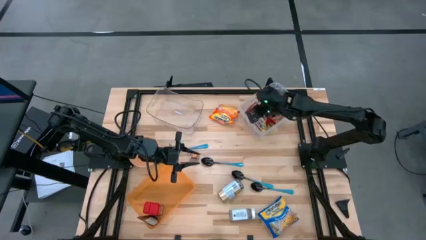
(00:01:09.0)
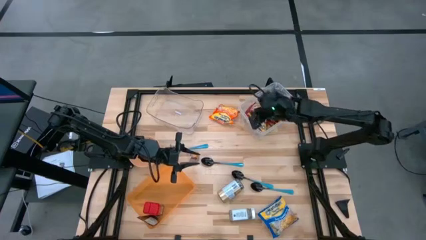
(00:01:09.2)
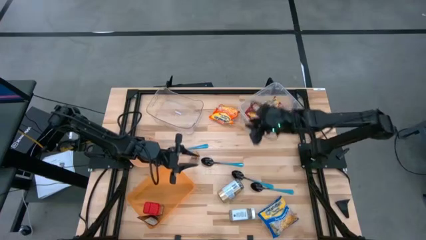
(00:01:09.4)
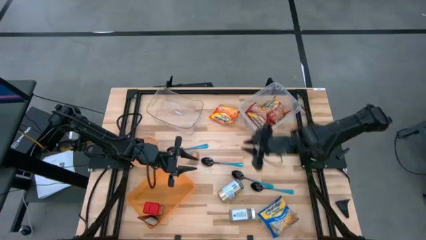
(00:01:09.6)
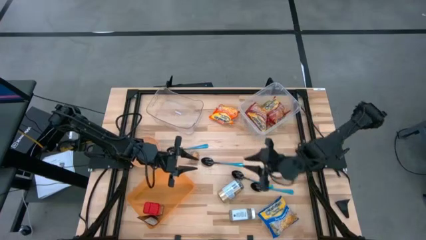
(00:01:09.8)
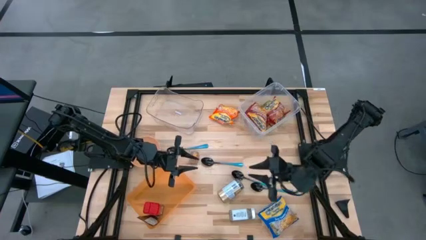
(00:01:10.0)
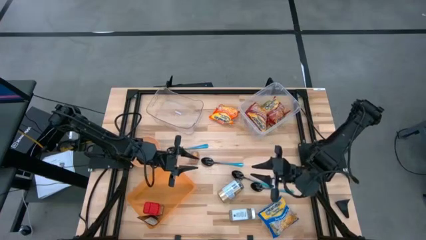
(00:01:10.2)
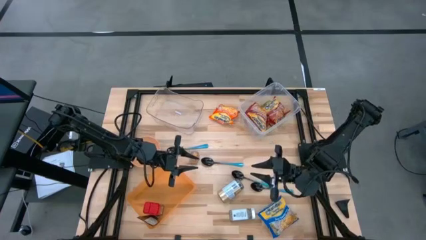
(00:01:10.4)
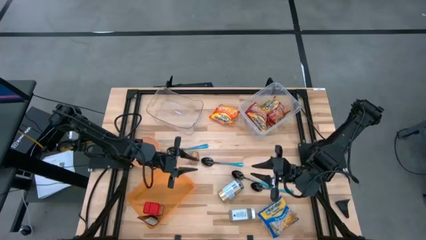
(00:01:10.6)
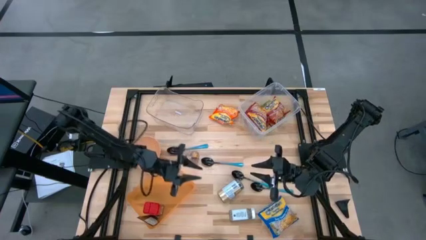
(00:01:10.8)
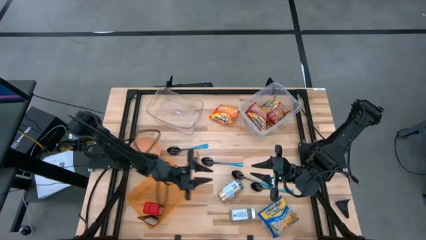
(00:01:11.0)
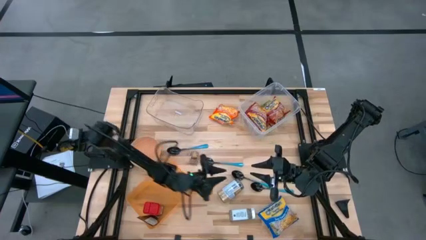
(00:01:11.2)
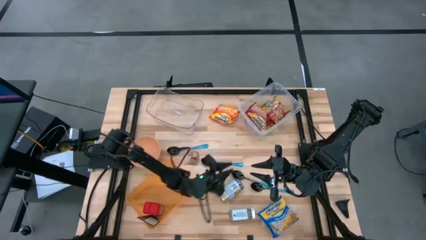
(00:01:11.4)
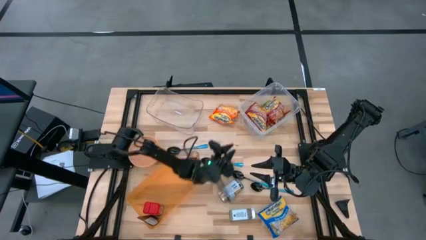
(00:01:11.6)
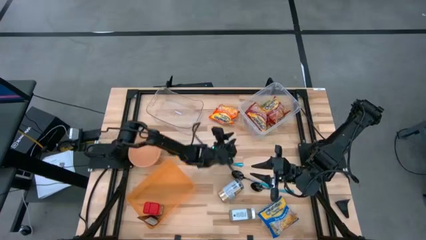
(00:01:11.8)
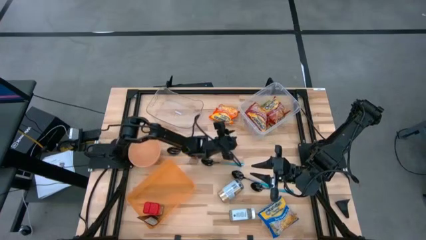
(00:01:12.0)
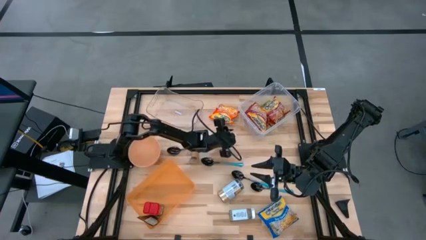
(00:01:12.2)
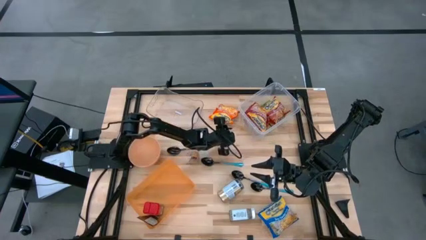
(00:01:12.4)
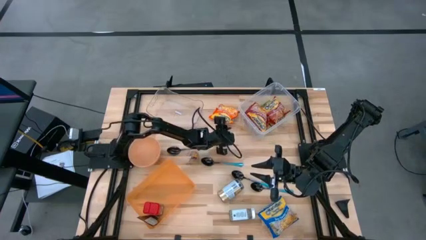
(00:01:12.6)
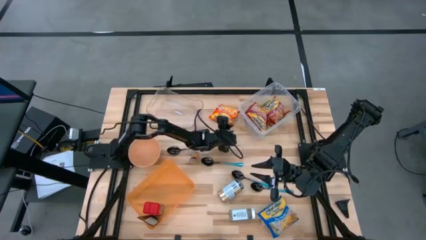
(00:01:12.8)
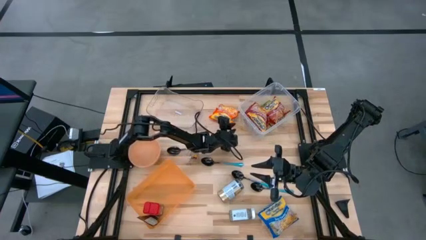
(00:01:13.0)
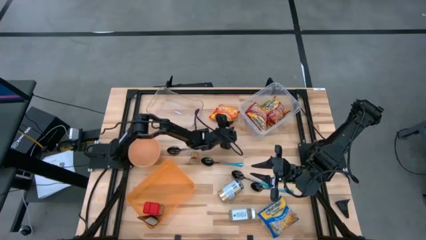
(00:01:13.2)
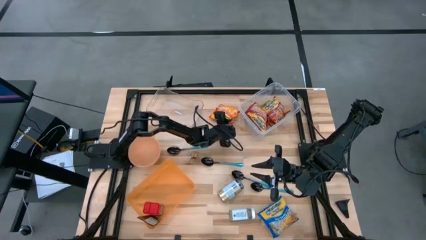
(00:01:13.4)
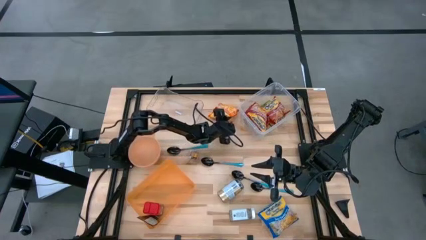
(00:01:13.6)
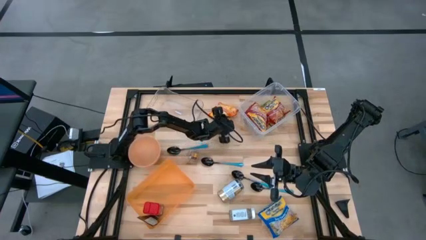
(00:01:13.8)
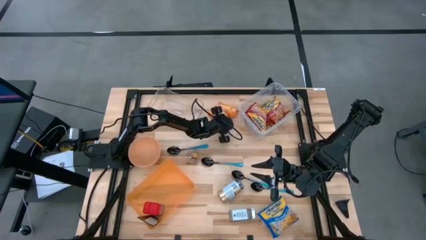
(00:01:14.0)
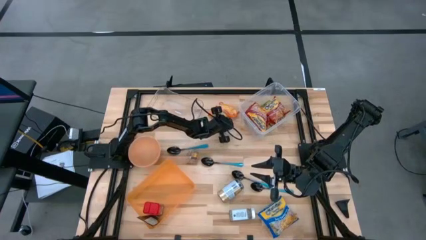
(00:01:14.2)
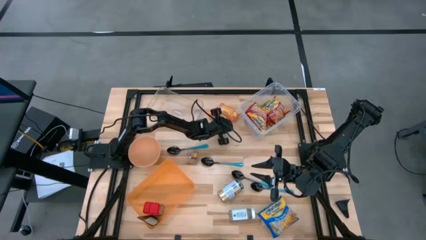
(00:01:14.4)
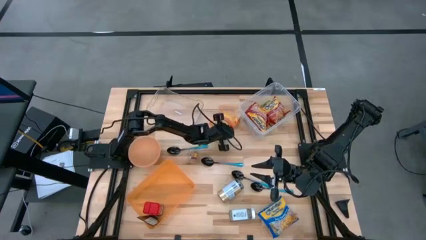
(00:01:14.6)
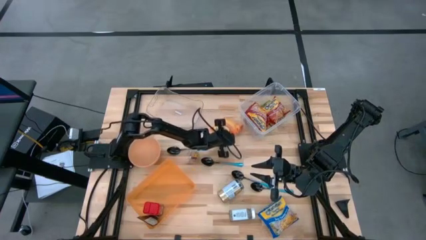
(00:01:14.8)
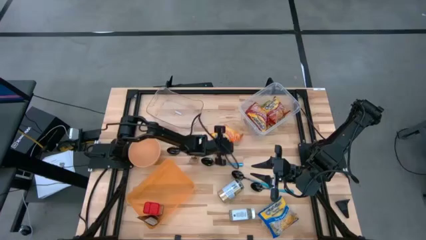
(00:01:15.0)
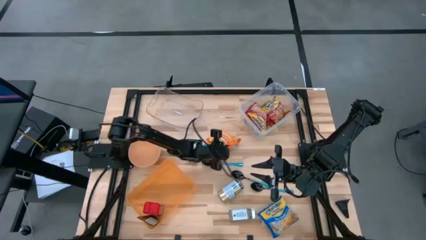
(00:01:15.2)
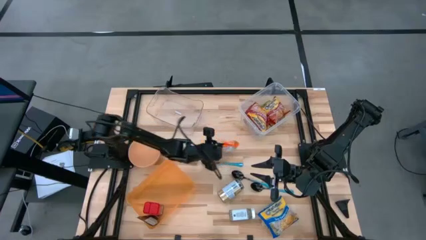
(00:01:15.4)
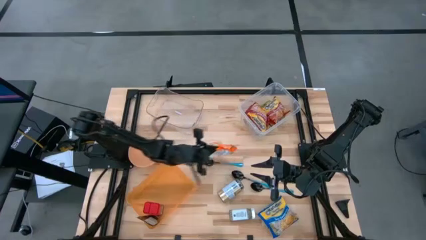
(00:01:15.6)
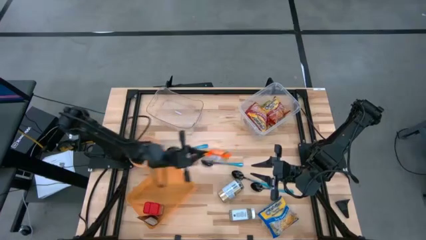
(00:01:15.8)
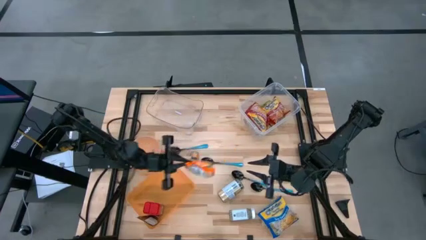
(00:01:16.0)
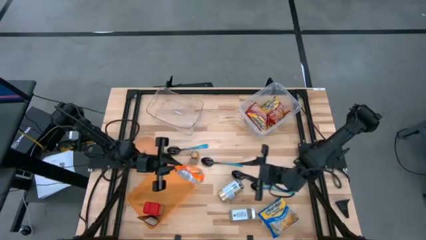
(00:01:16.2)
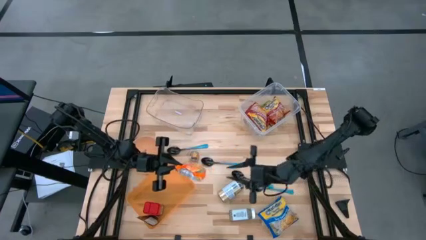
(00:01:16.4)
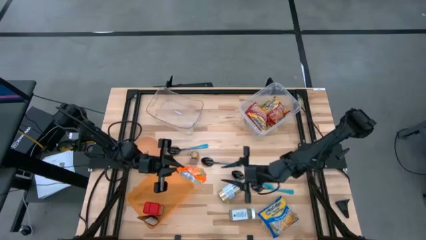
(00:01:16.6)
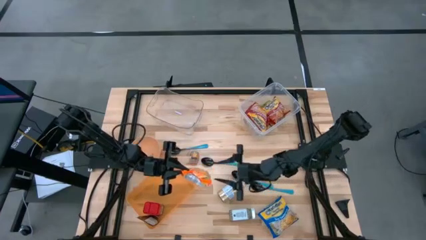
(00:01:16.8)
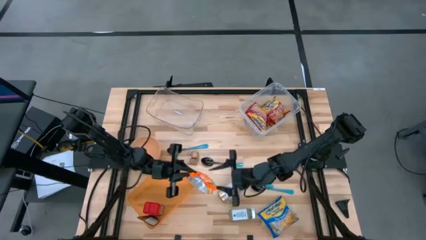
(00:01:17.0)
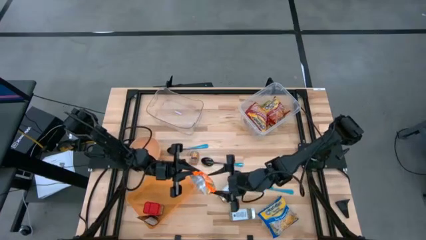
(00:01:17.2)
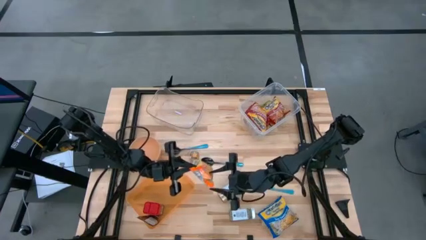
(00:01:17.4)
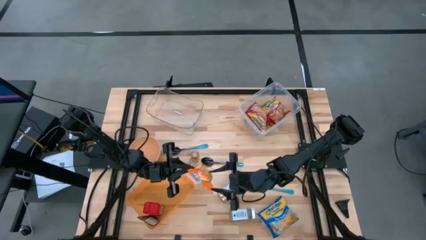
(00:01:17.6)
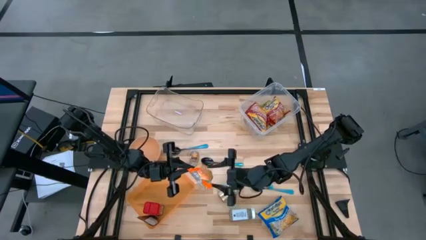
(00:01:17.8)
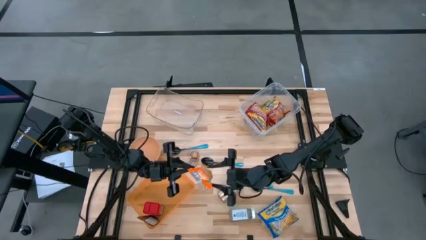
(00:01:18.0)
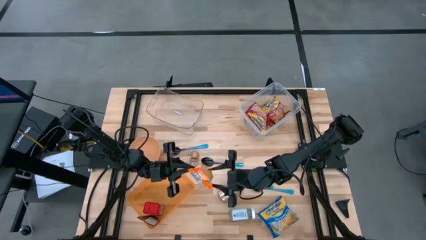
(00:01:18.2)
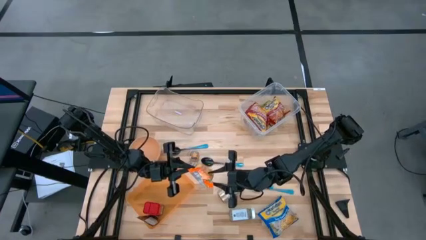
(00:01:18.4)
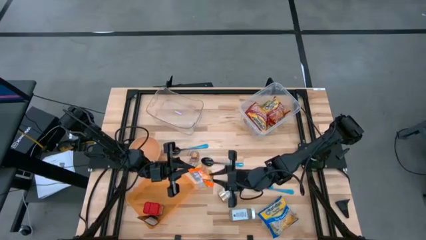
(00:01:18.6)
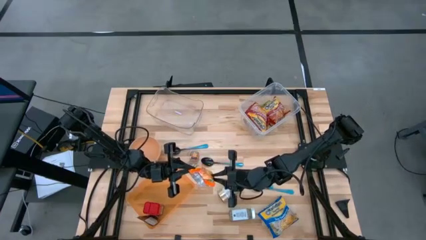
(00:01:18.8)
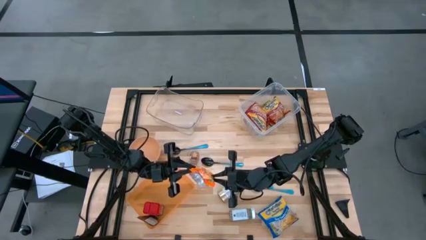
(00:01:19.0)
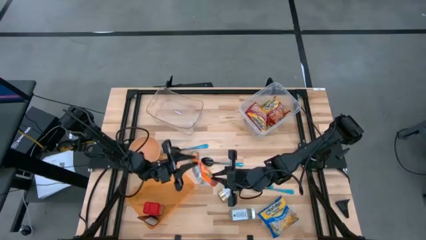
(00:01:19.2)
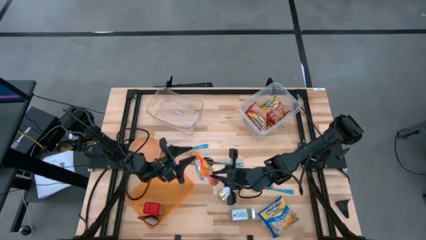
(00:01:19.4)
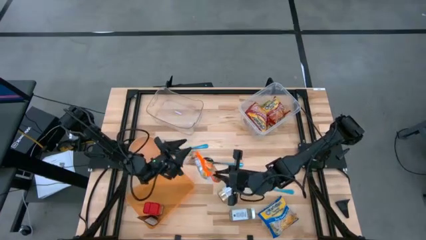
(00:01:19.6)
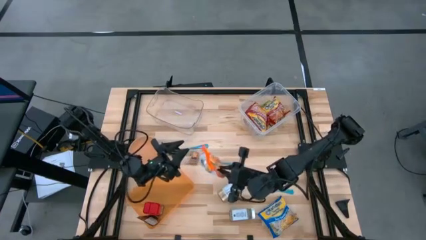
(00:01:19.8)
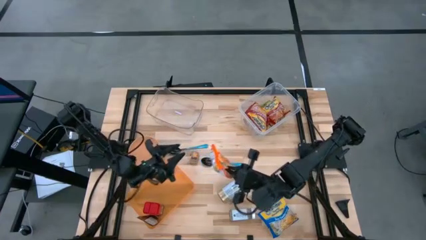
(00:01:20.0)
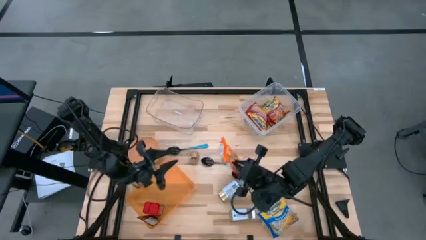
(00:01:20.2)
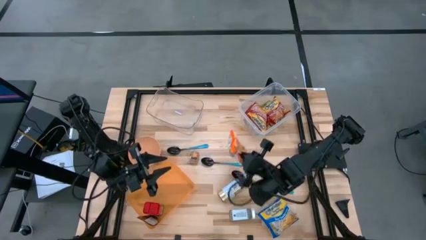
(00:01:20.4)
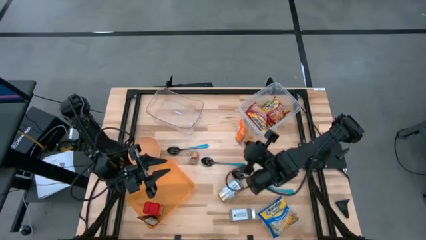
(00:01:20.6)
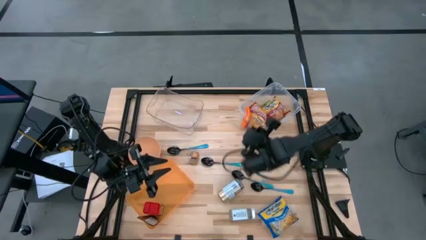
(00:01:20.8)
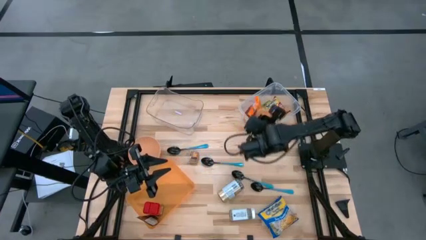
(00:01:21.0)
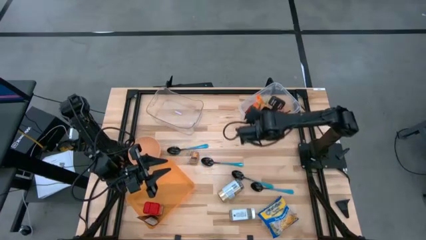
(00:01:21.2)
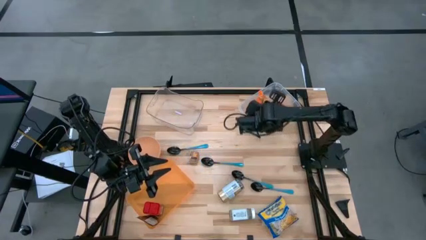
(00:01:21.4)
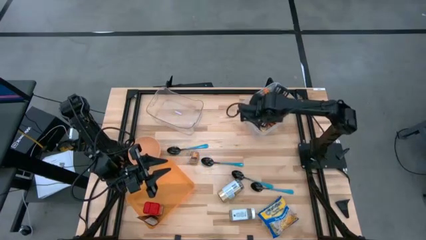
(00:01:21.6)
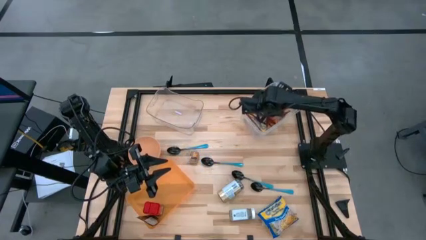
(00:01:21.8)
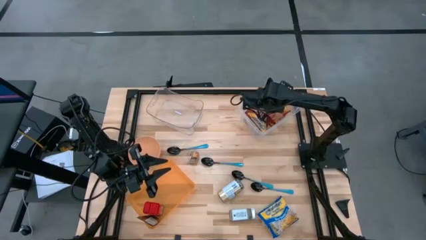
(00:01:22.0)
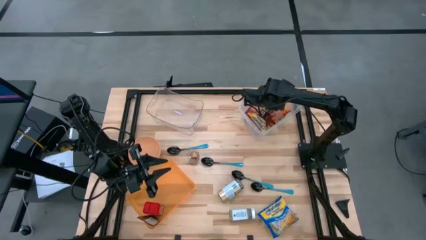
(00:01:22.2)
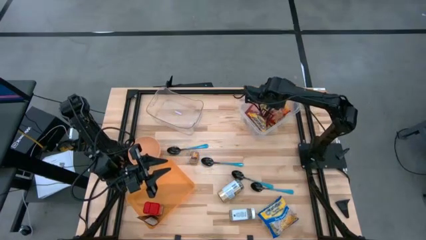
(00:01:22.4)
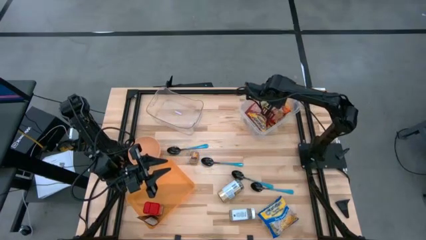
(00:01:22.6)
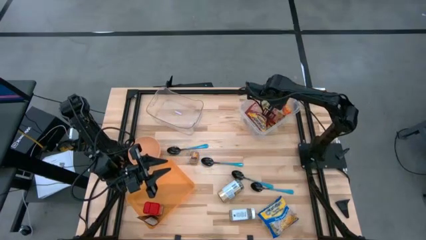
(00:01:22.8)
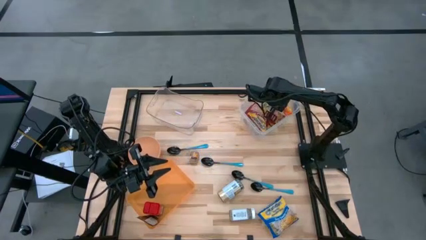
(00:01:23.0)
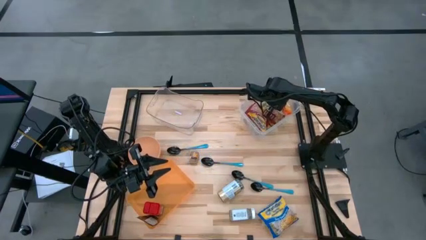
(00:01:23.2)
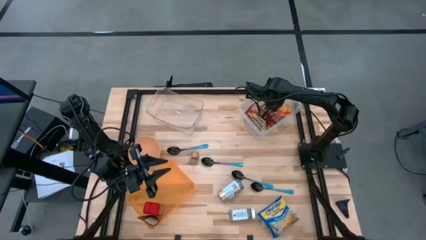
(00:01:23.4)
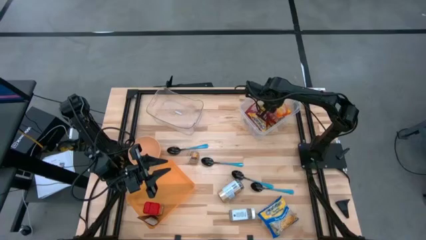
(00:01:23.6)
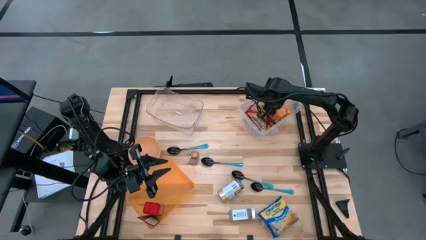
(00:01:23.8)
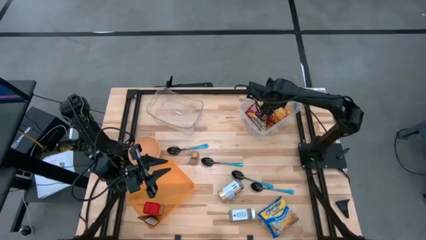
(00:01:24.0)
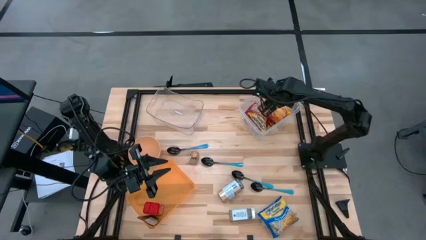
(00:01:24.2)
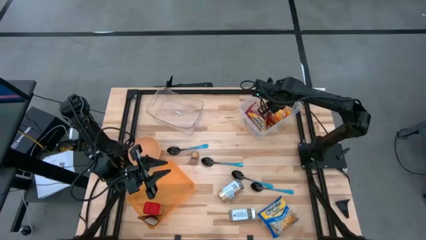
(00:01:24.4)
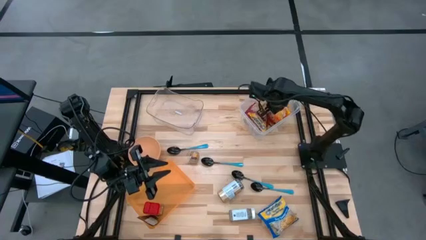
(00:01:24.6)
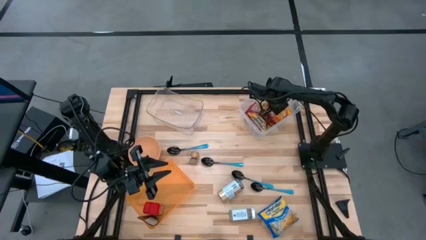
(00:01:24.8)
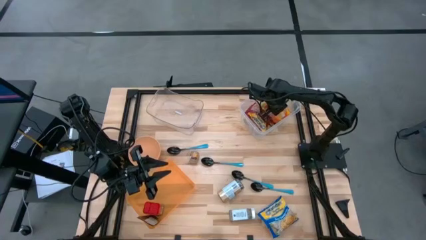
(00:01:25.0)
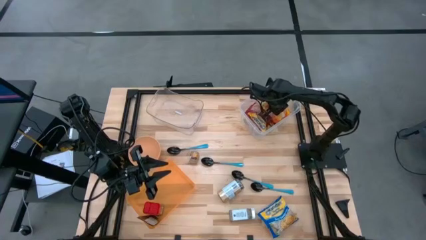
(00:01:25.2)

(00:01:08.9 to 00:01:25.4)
Task: Pick & Place Food Item
Put the orange noodle pack into the right transparent bin
